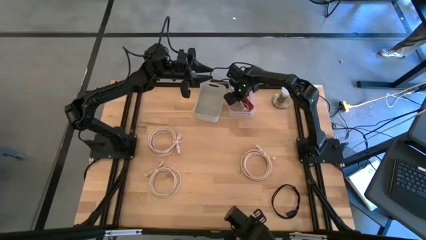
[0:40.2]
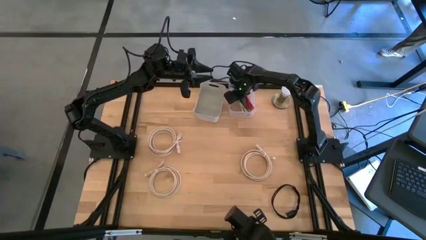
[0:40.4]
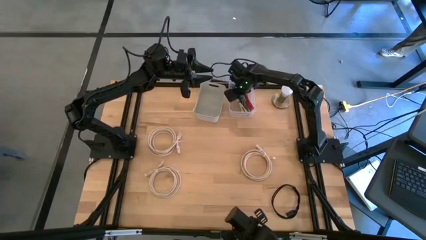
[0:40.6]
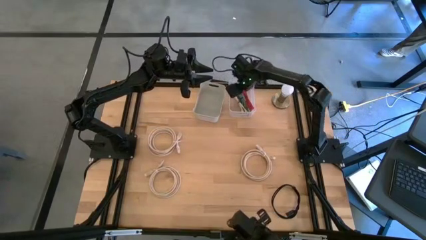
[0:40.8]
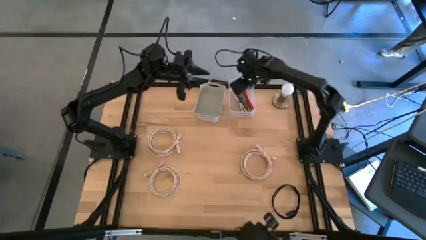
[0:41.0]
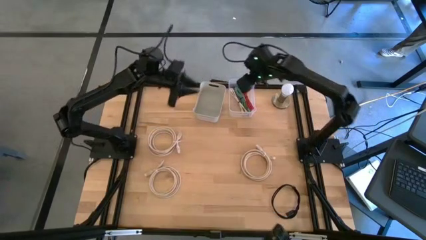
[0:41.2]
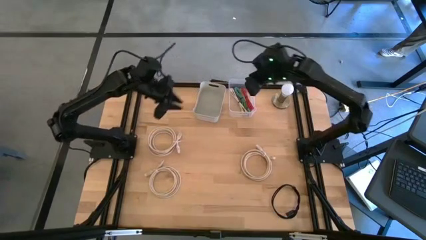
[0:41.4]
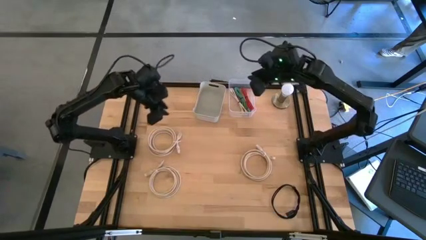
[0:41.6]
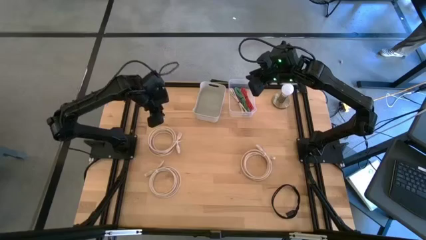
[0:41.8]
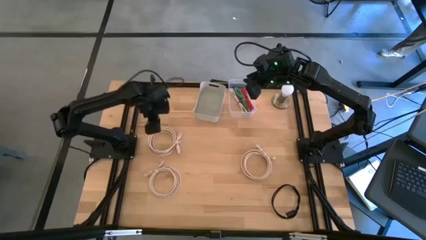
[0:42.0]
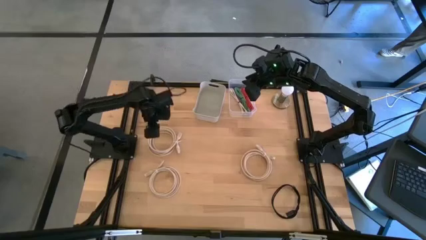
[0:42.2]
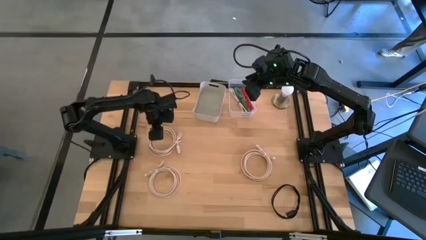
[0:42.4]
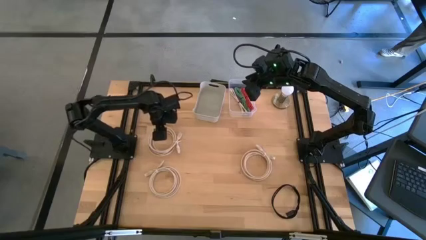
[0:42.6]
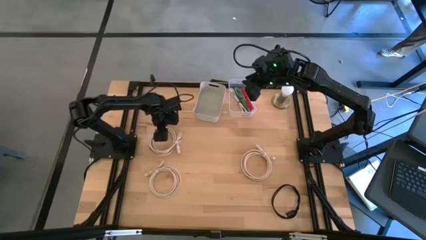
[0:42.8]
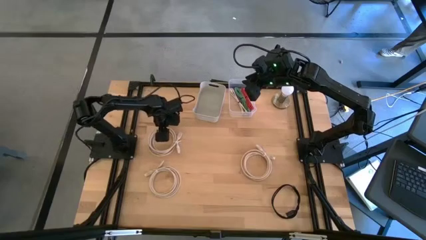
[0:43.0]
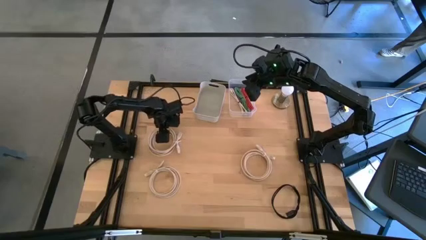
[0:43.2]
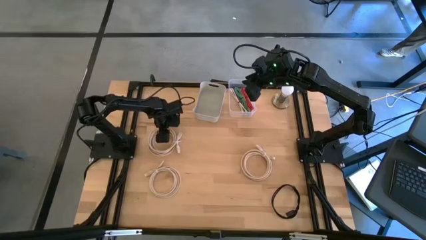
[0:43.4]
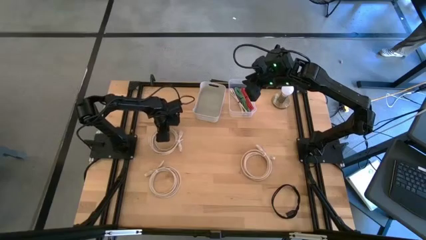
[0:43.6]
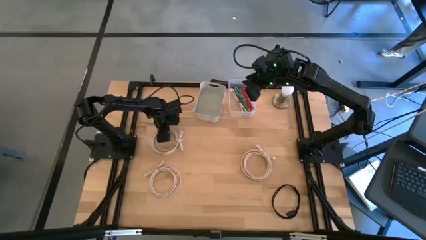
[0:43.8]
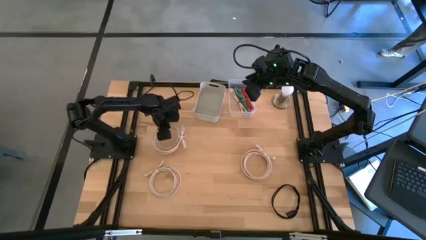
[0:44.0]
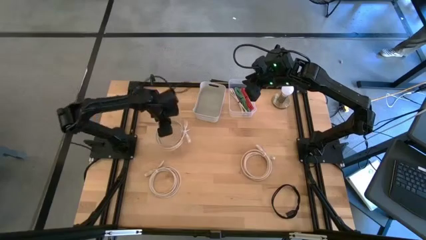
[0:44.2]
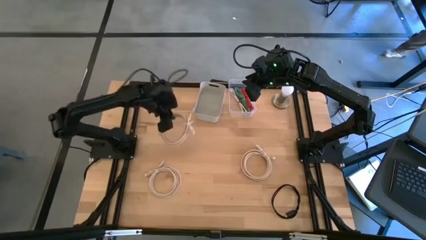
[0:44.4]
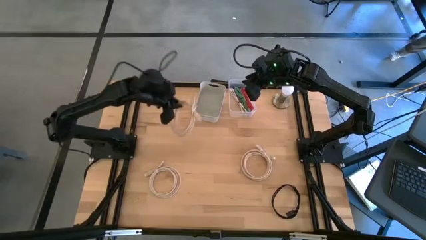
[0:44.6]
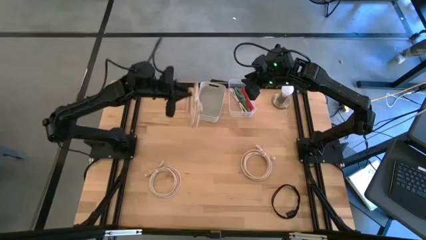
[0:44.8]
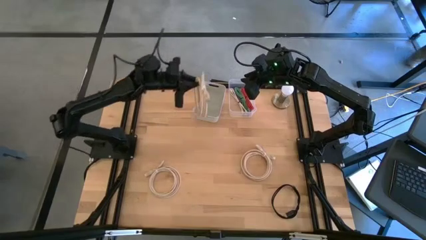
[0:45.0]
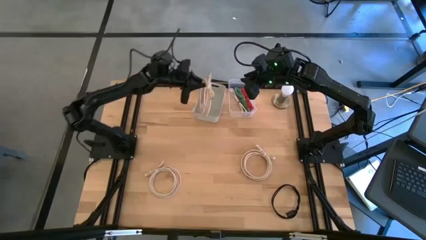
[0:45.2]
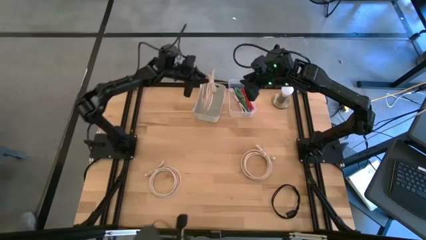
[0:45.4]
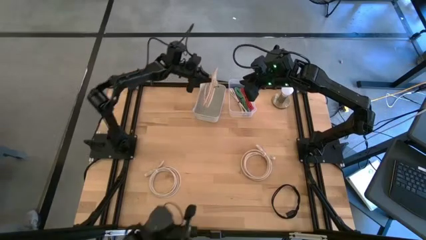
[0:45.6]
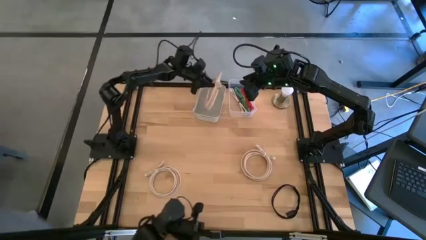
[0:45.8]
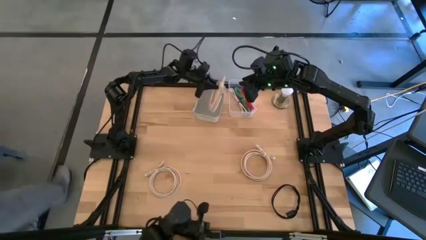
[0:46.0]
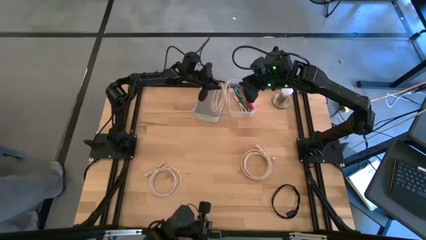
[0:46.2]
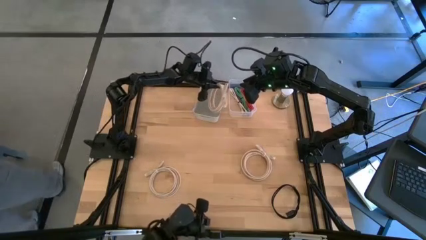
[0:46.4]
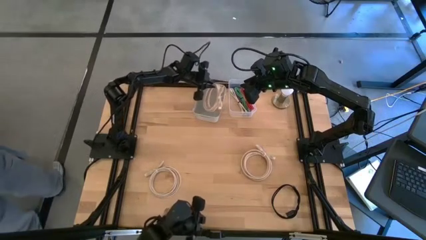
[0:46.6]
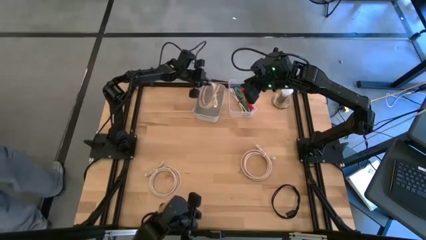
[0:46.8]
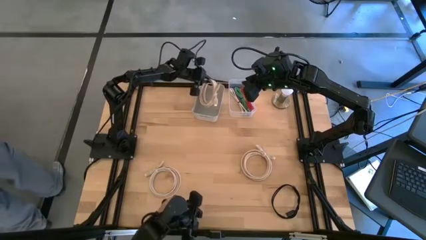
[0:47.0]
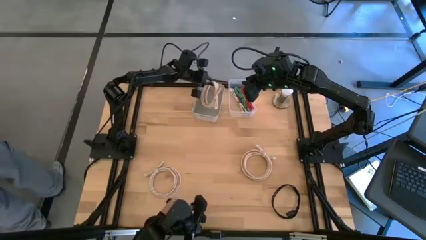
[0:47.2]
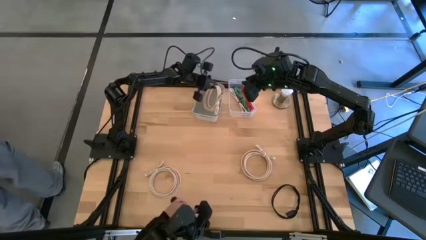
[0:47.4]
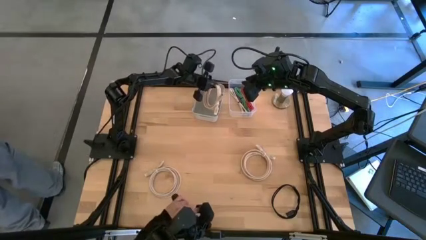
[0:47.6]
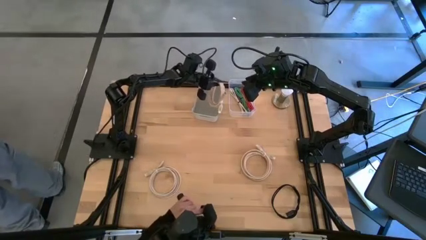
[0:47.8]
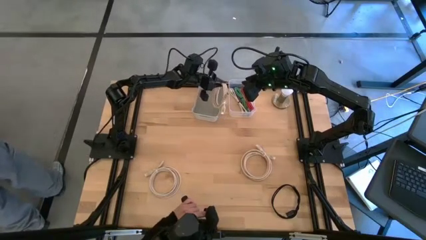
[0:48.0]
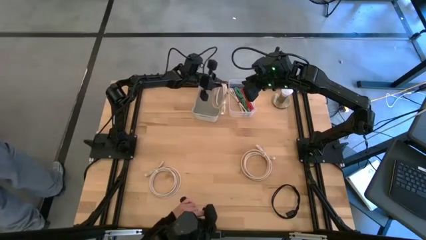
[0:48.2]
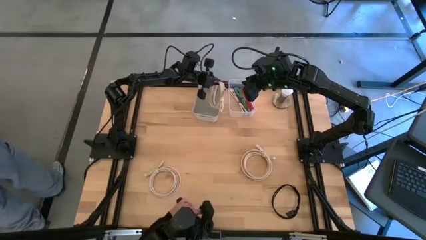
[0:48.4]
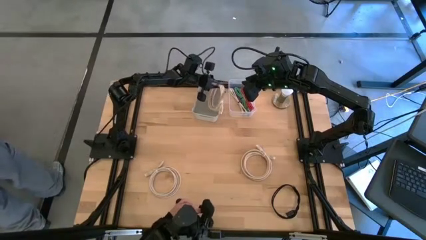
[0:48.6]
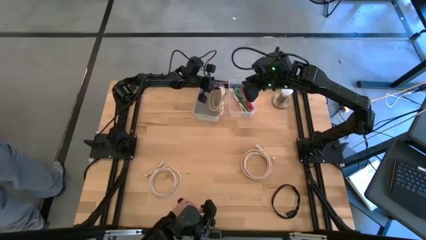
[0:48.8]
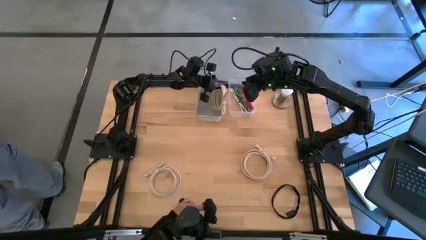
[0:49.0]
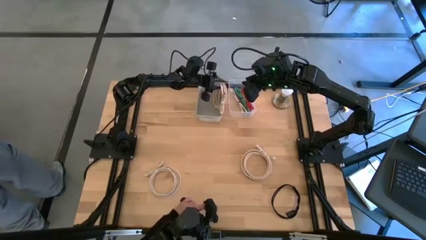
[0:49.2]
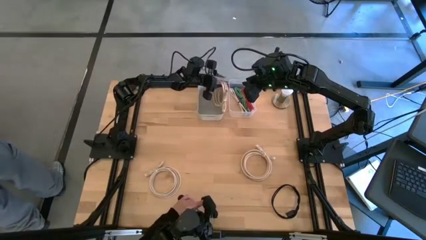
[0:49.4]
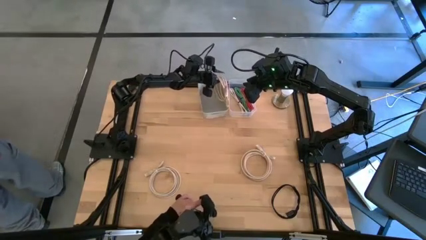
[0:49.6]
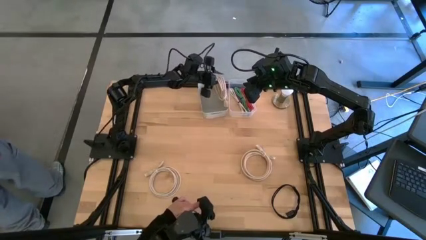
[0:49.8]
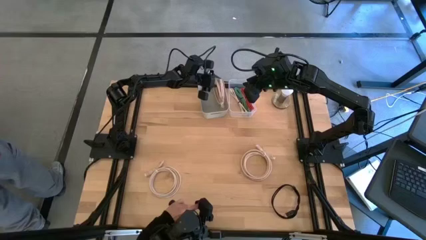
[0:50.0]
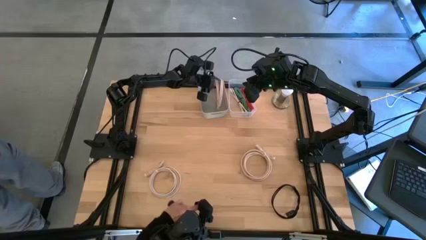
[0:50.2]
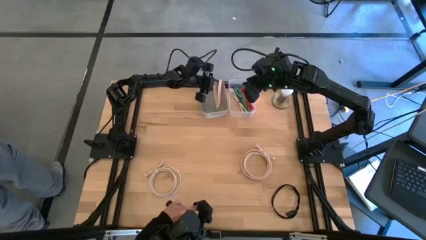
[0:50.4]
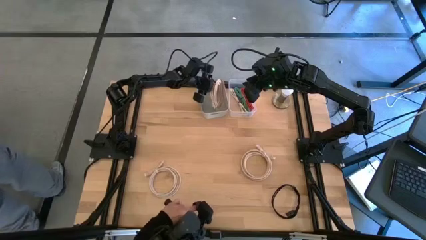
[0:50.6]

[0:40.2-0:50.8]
Put the top left brown hdmi cable into the white bin

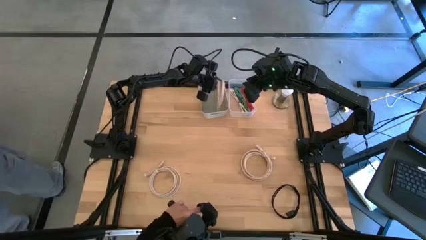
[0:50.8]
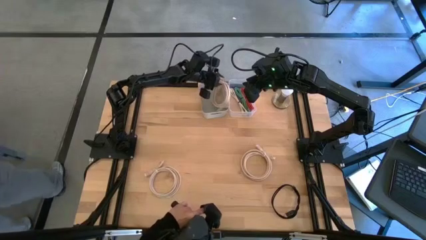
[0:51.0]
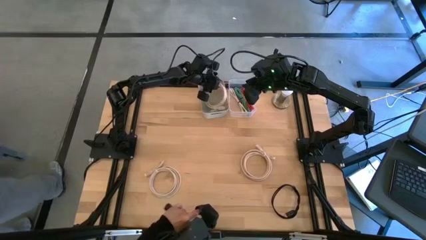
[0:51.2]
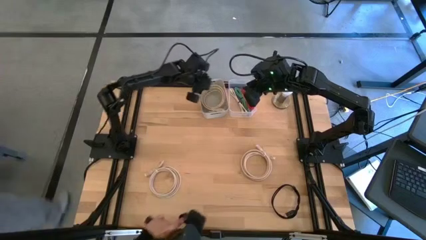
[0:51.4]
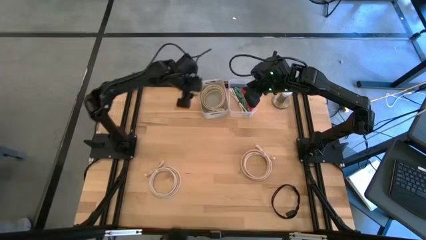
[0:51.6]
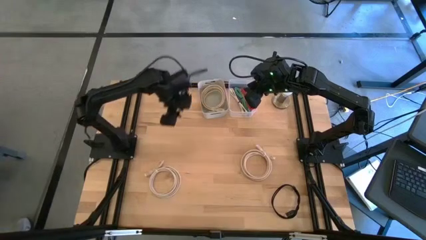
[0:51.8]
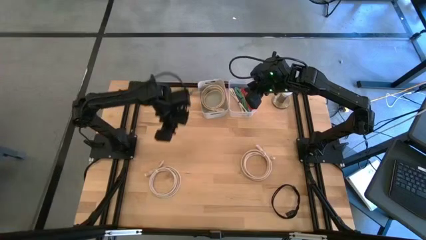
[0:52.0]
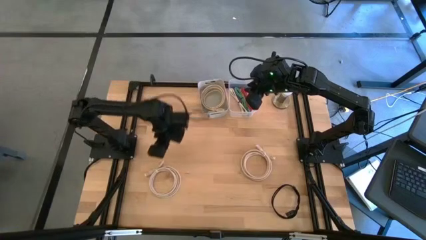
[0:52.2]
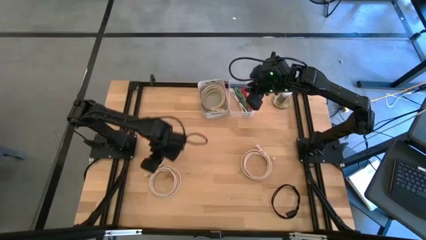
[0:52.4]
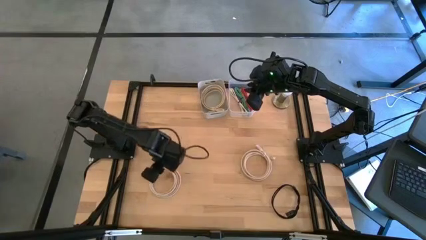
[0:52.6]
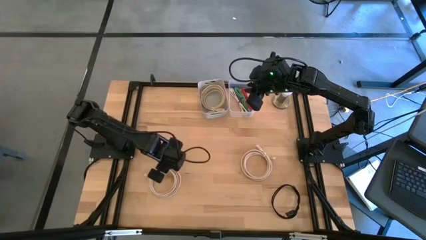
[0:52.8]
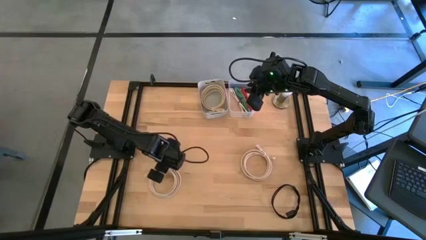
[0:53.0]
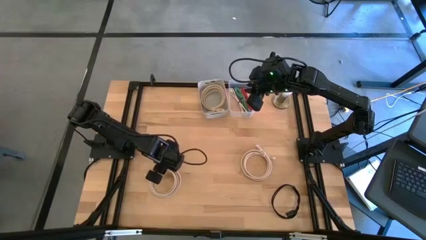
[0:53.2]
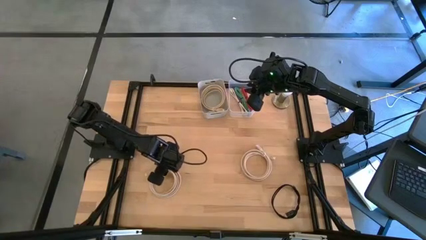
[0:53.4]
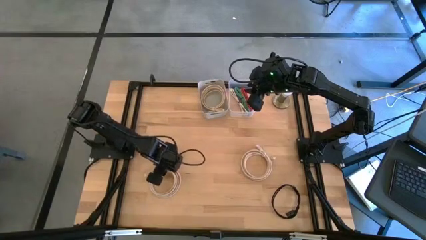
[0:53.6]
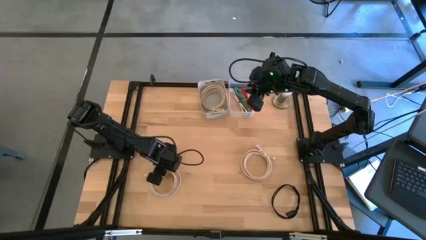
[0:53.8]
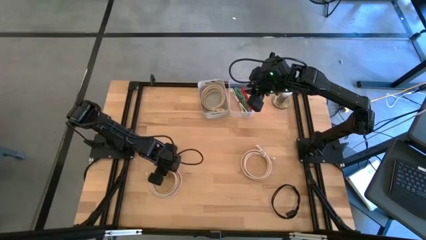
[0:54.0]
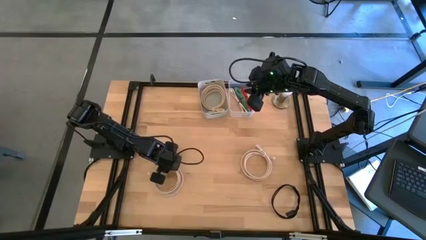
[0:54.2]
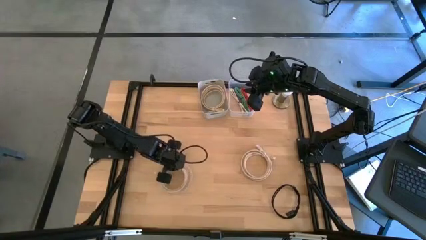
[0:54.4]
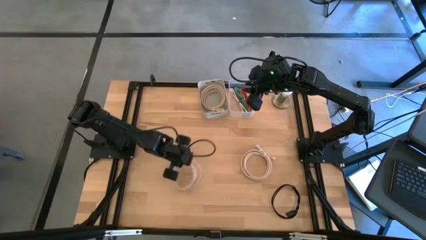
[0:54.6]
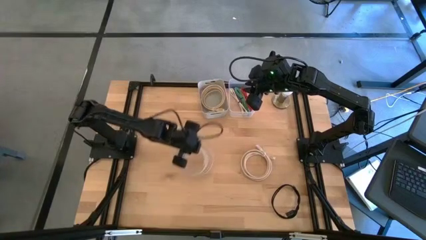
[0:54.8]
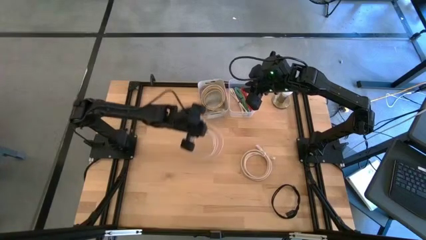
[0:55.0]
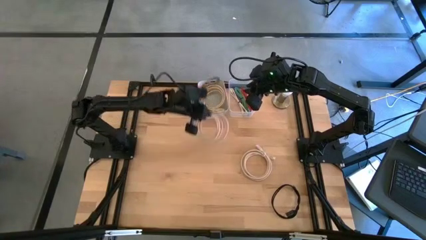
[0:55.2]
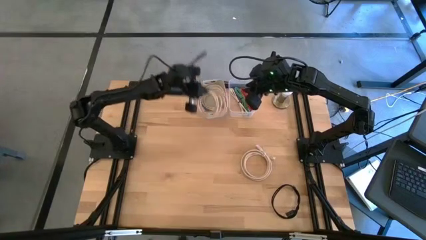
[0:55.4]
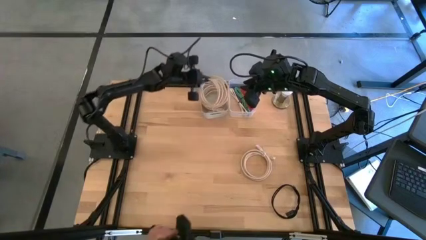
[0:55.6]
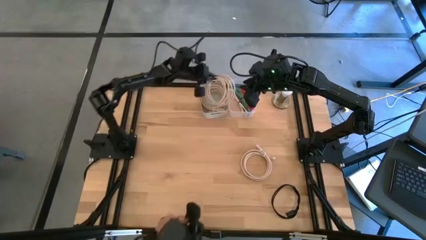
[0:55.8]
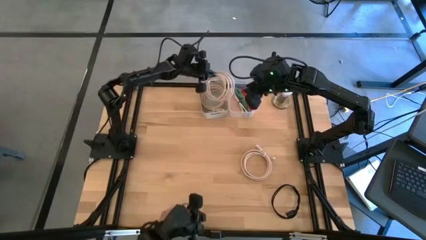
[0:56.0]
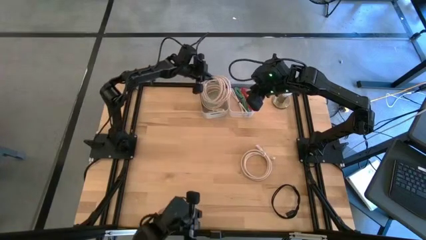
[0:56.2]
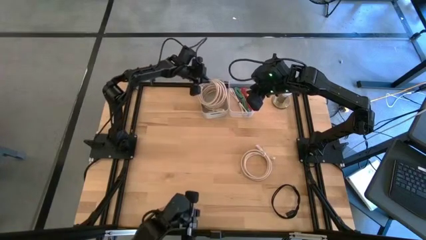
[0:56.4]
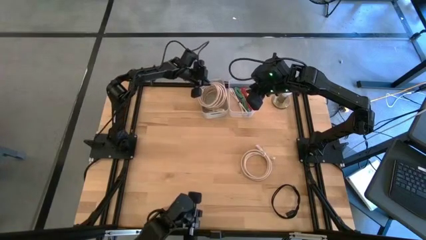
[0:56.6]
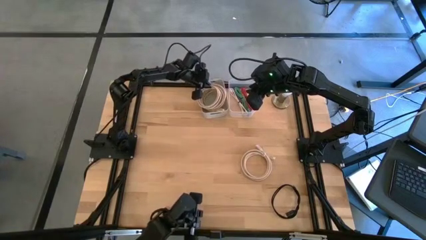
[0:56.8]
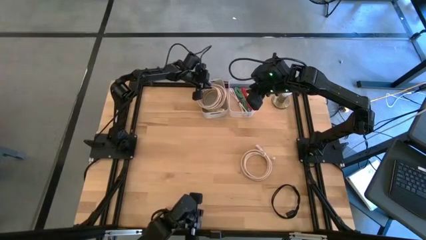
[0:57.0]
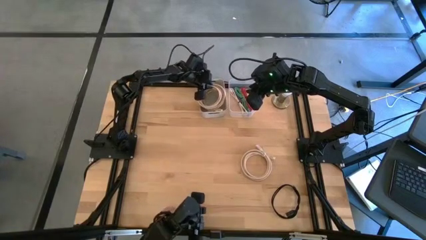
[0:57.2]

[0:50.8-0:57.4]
Put the left brown hdmi cable into the white bin
